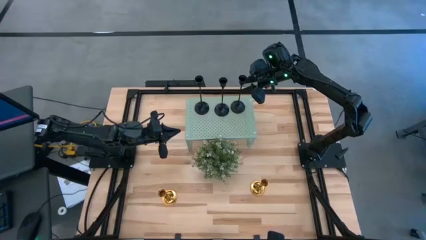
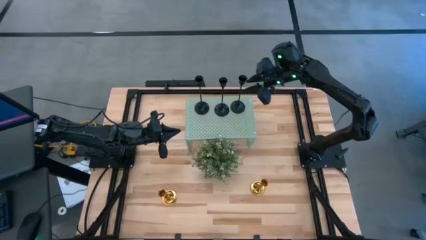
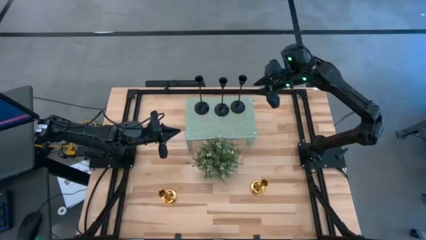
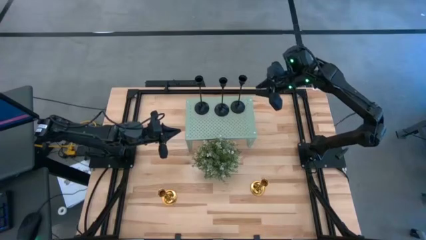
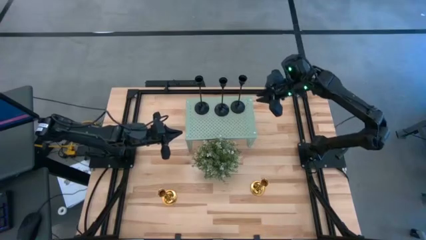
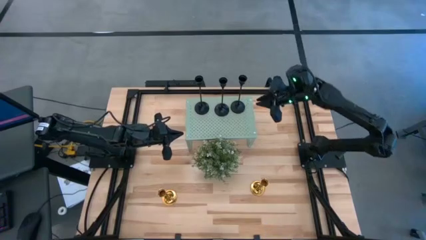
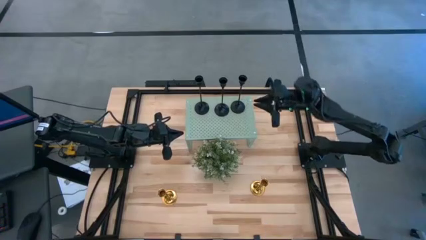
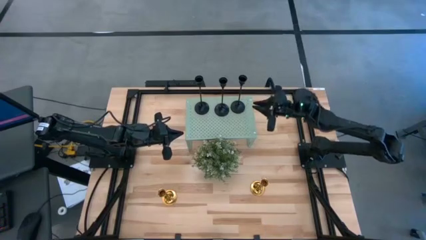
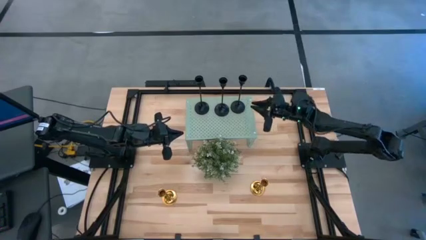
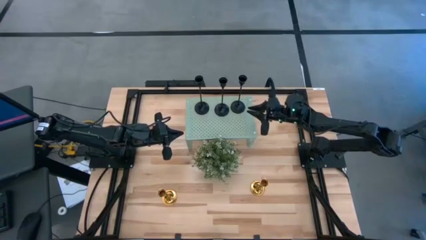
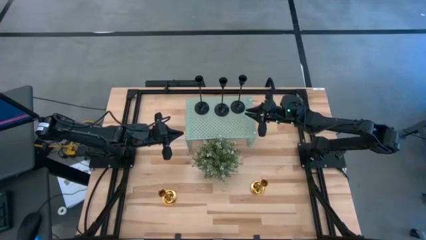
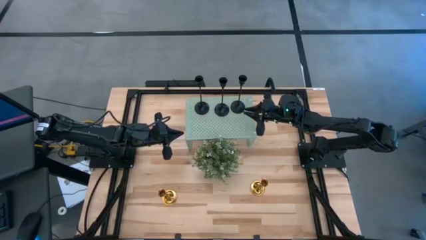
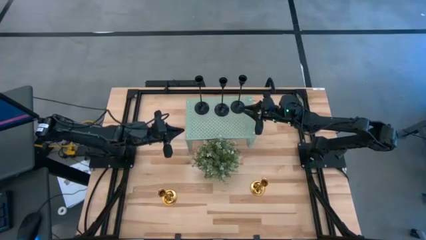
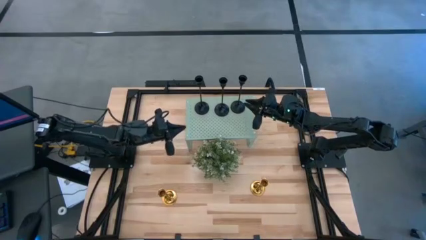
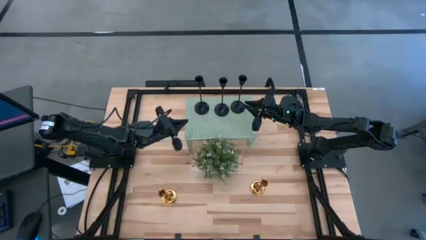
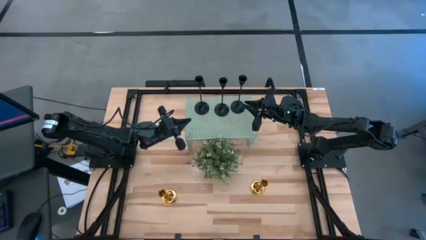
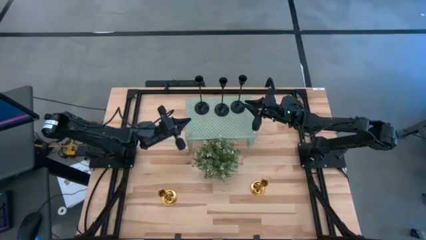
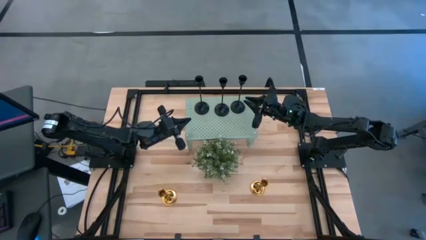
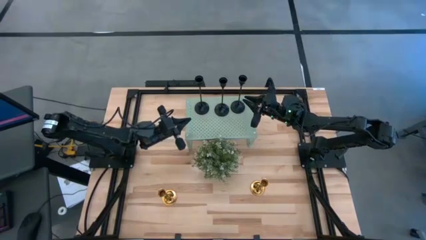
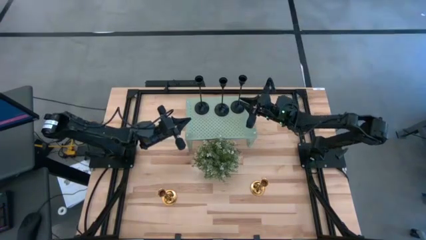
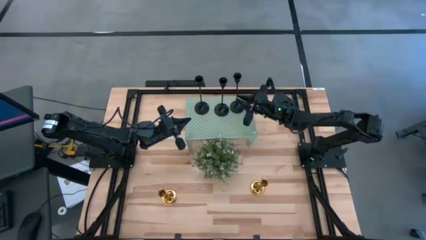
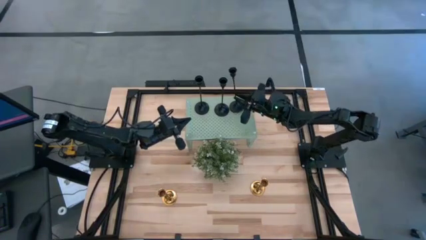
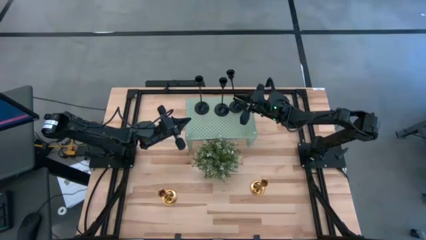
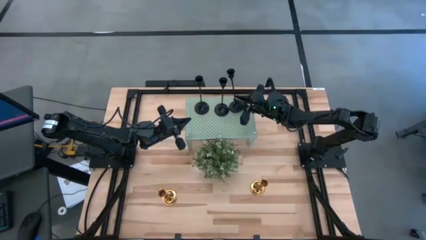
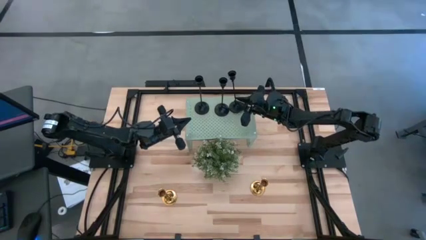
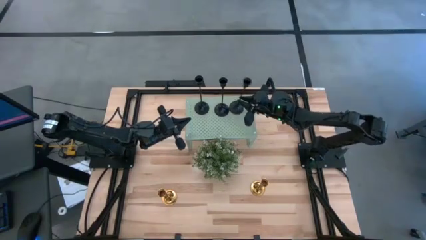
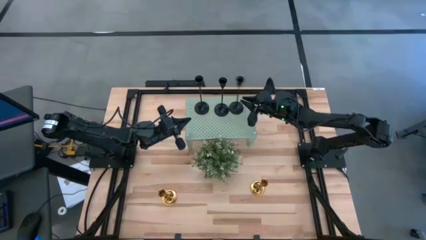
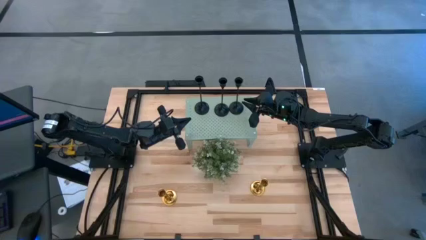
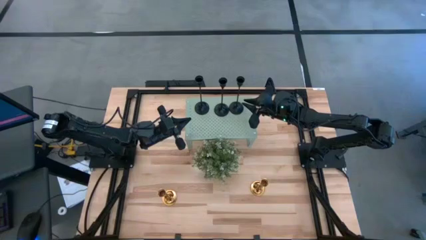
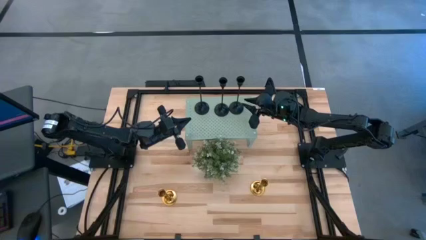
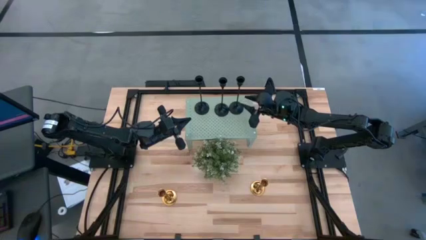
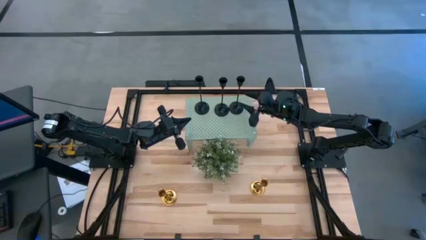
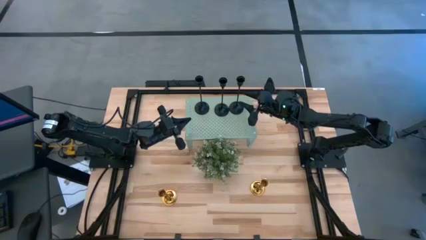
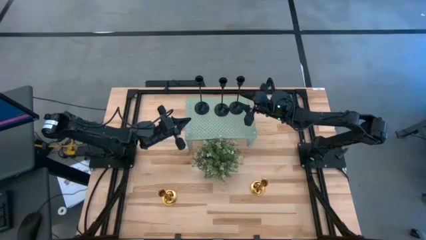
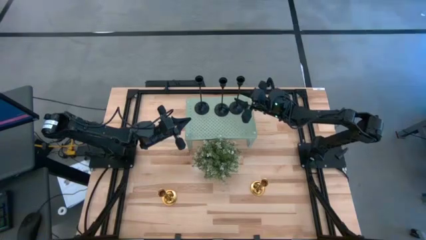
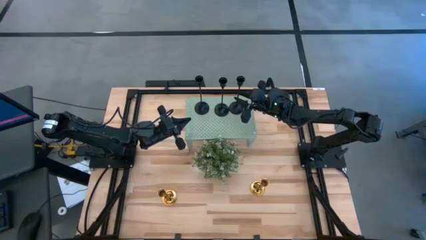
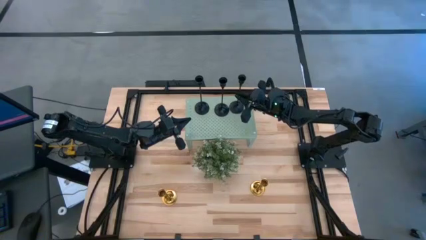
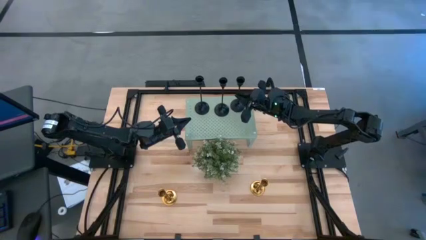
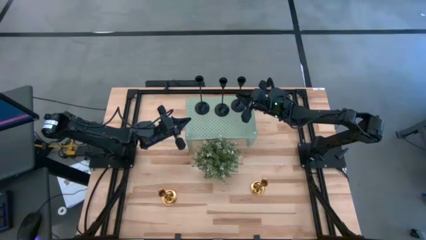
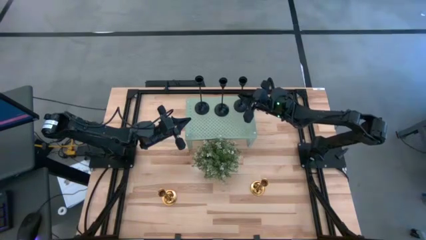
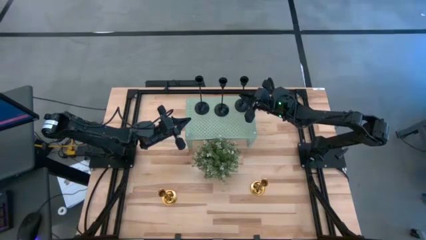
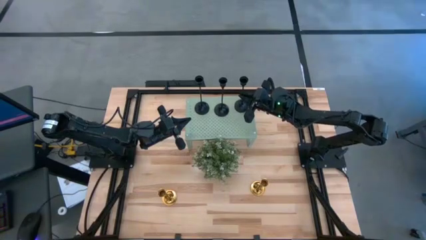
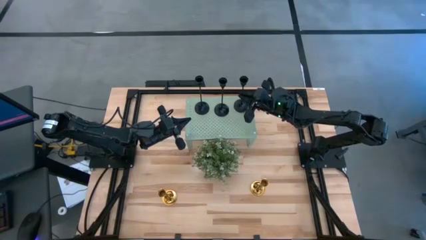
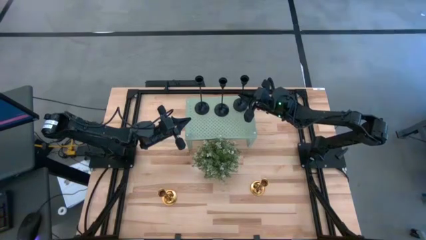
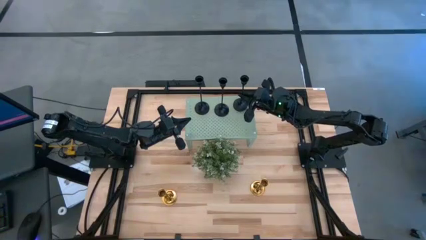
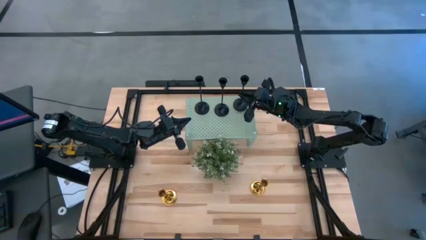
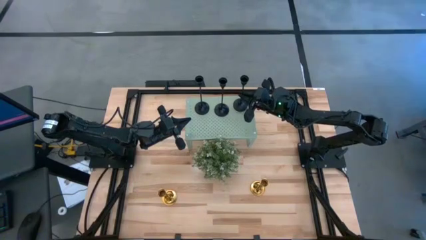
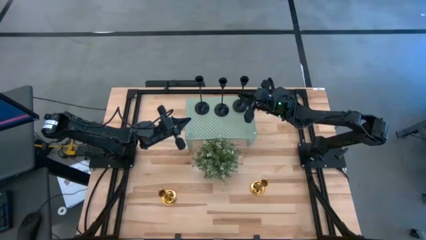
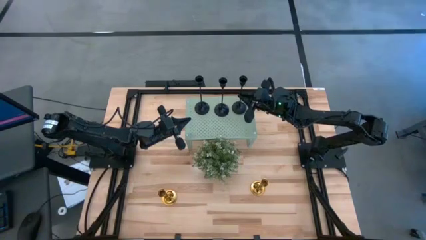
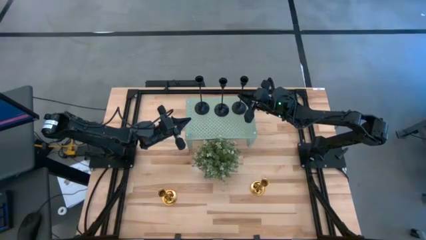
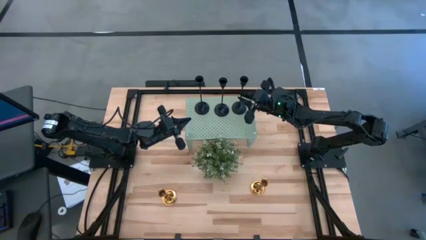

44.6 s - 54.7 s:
Task: Pick & Place candle stick holders
Put the black candle holder on the shelf

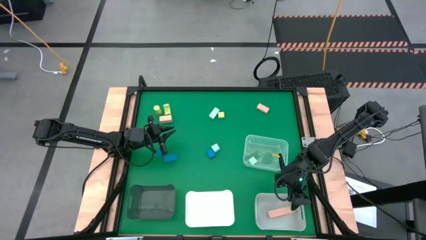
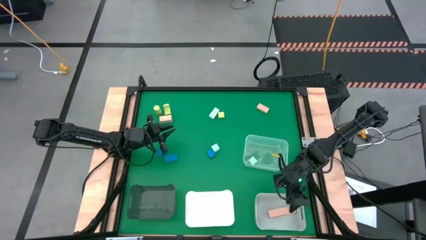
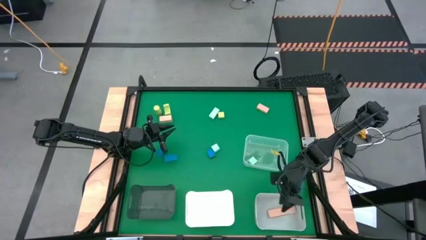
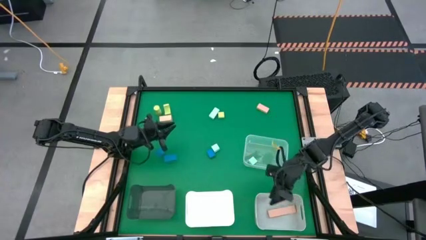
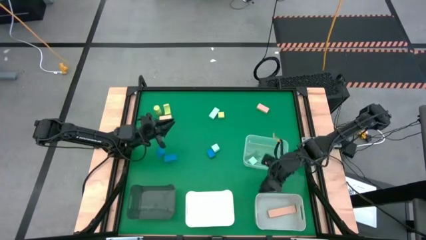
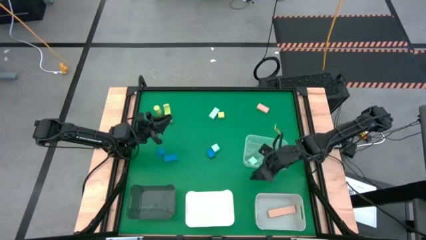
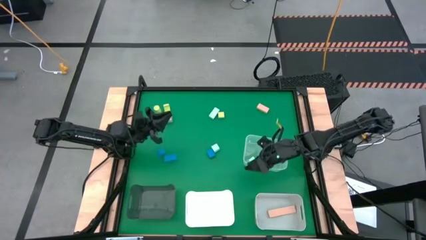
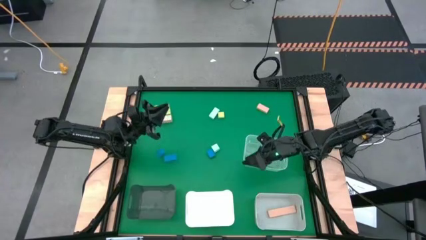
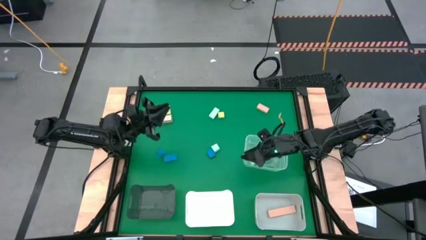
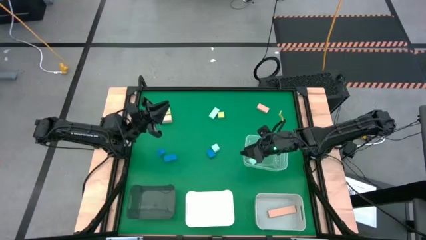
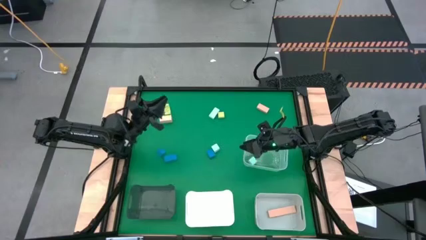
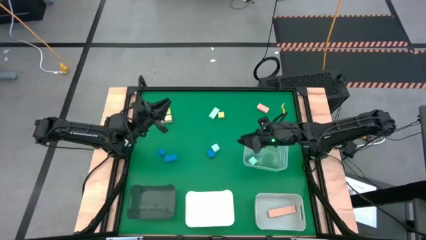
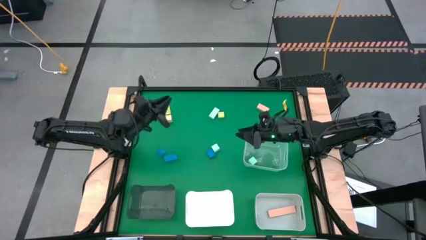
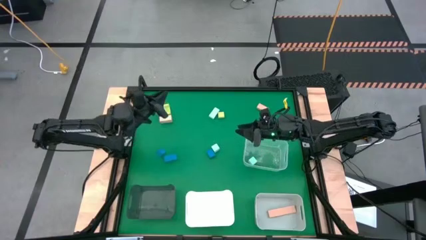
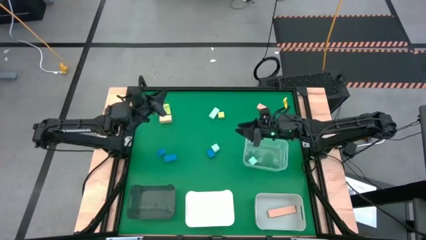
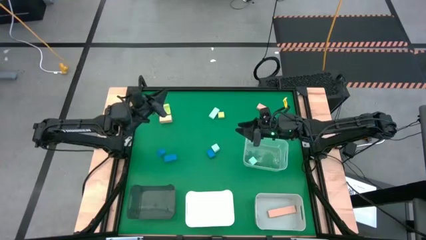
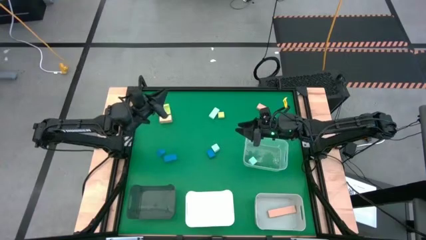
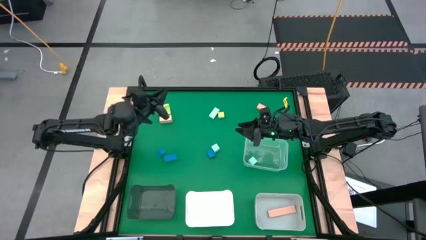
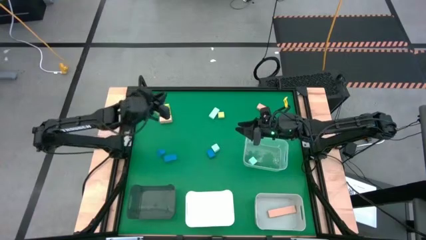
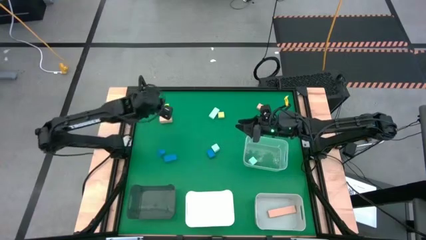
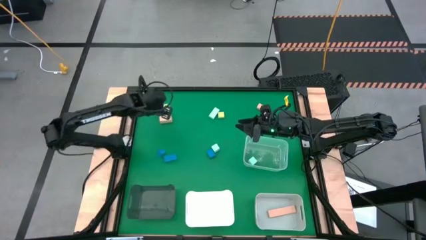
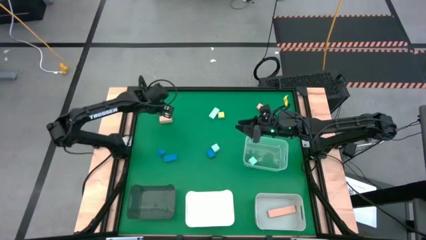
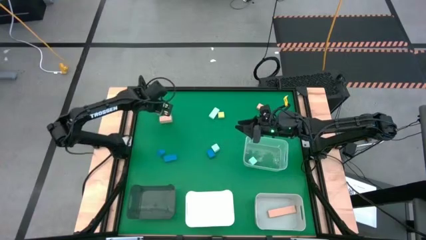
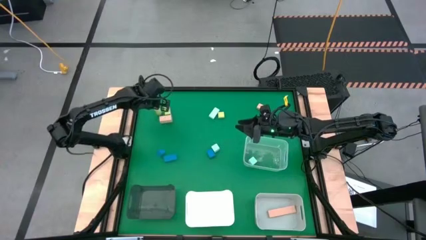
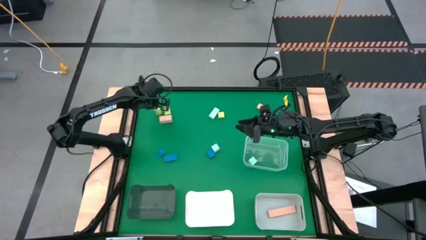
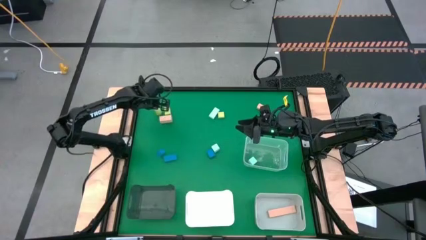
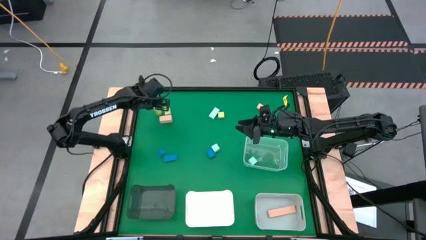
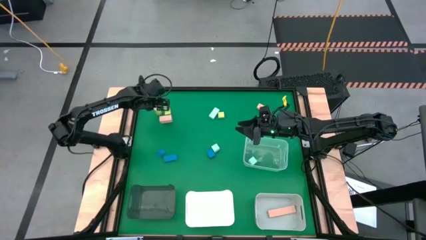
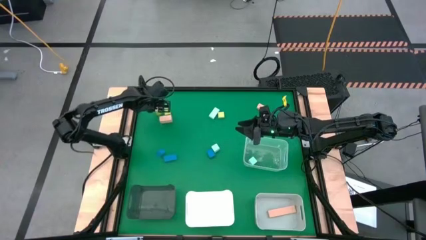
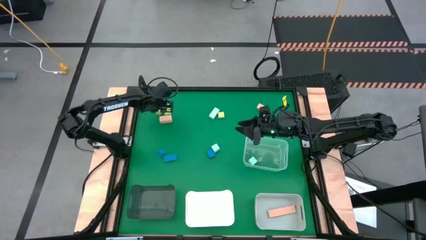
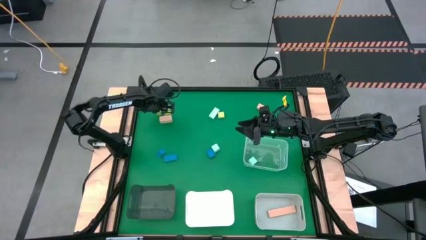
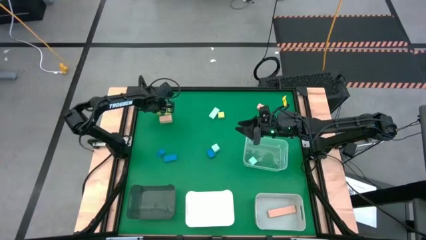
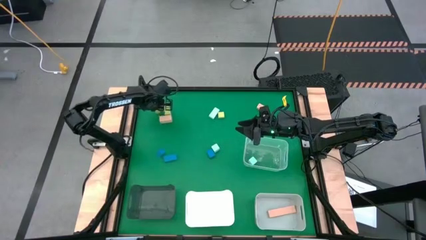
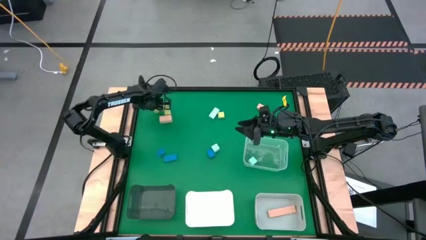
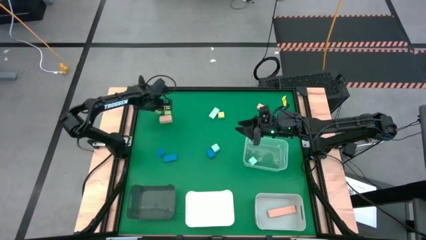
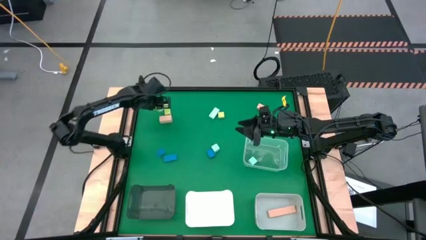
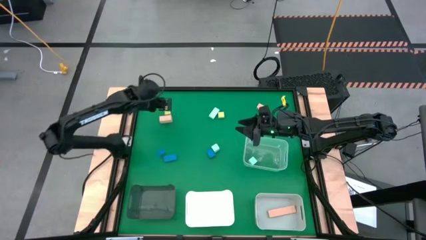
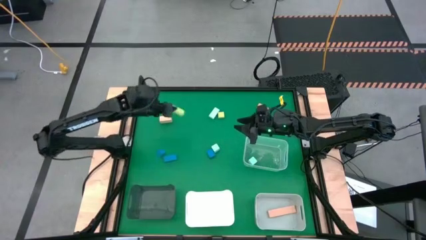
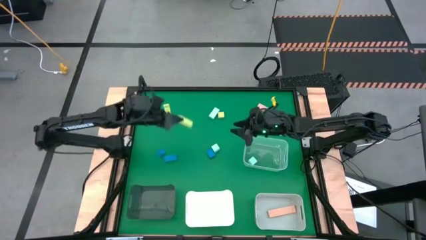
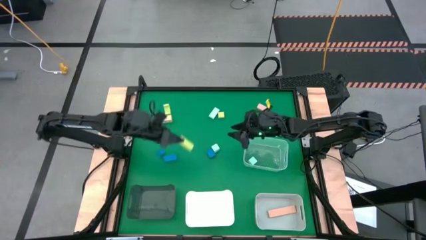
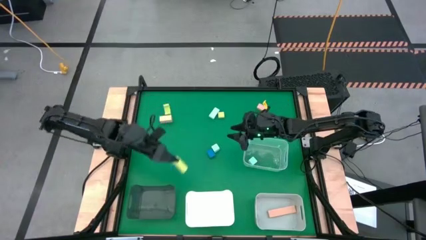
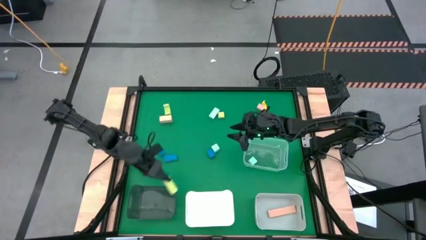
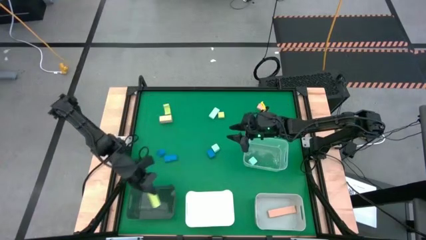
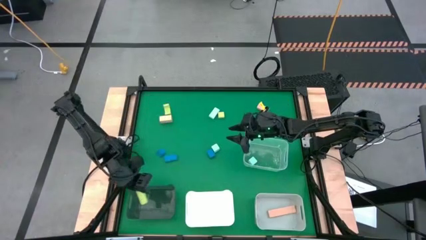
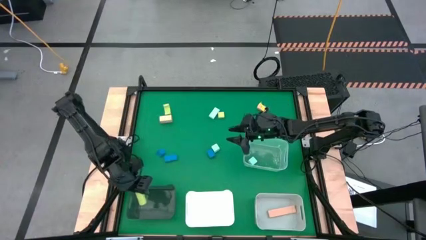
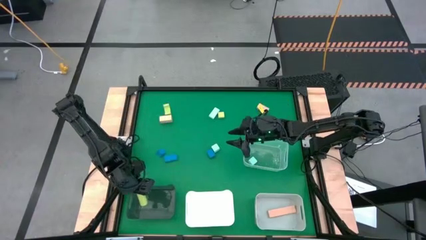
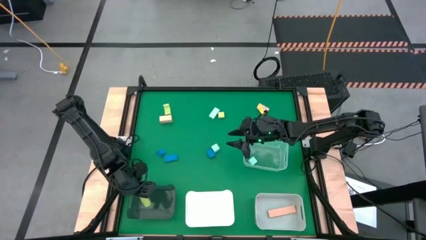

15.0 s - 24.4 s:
Task: Sort & place blocks by color
Put the left green block into the black bin
